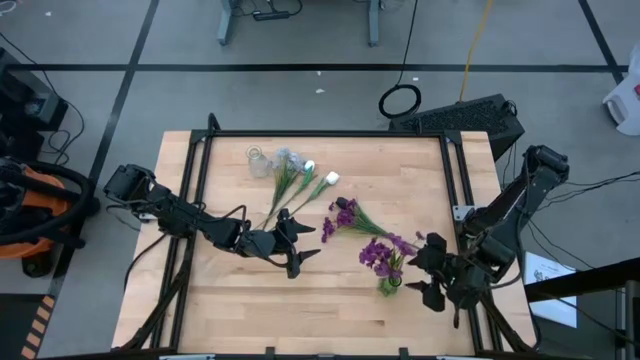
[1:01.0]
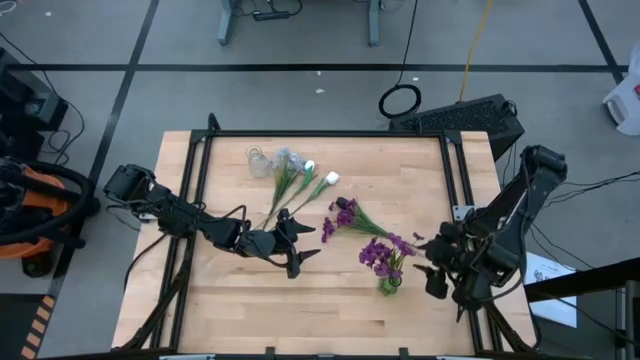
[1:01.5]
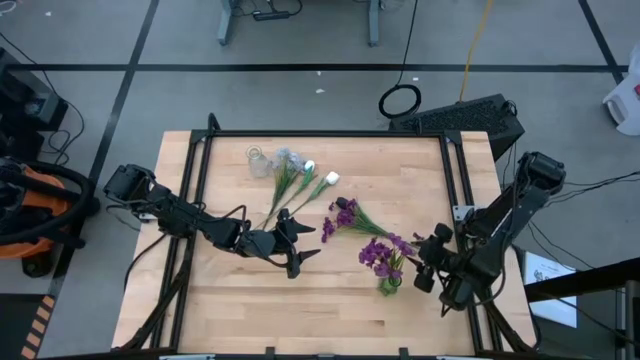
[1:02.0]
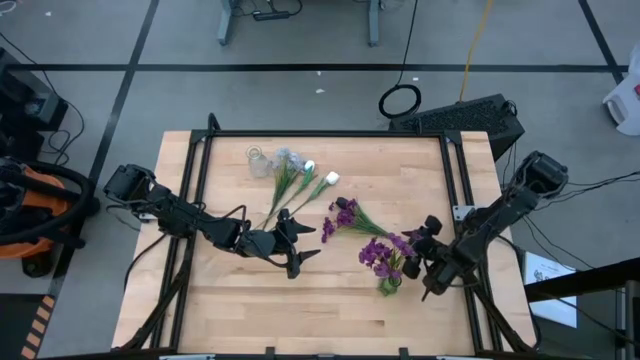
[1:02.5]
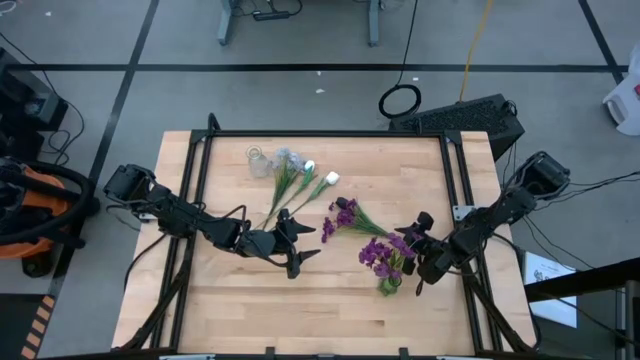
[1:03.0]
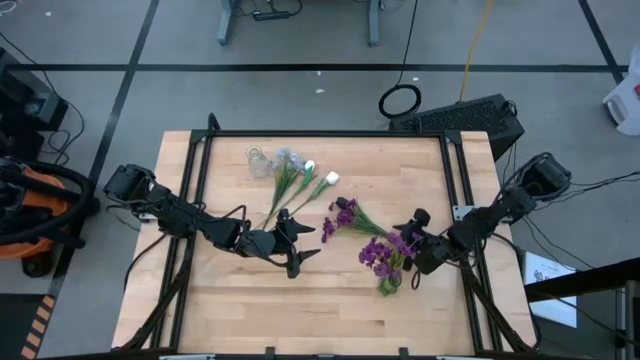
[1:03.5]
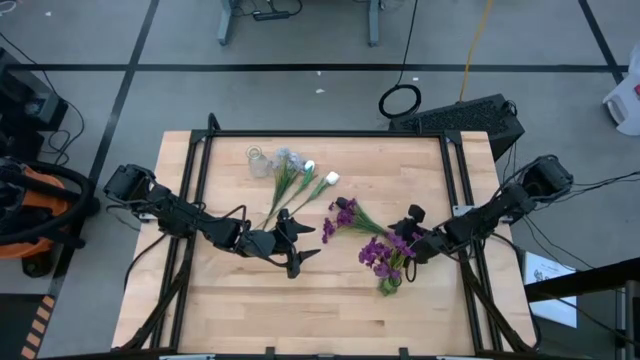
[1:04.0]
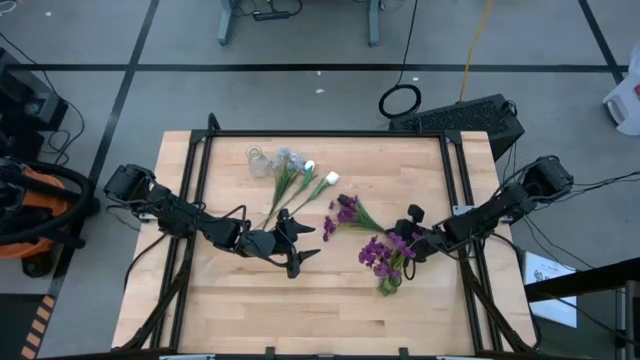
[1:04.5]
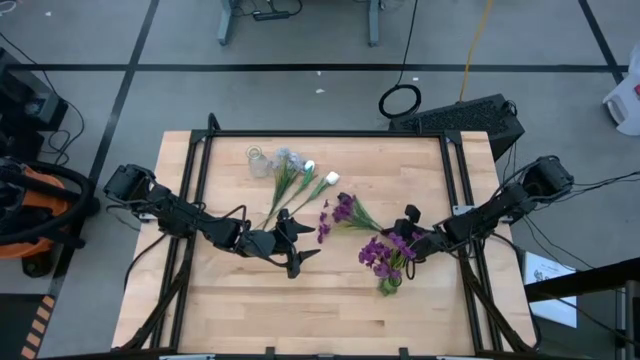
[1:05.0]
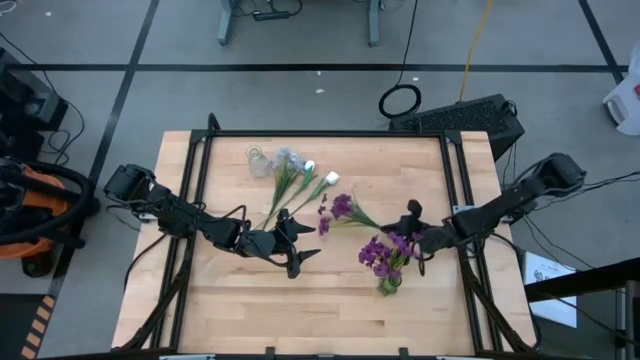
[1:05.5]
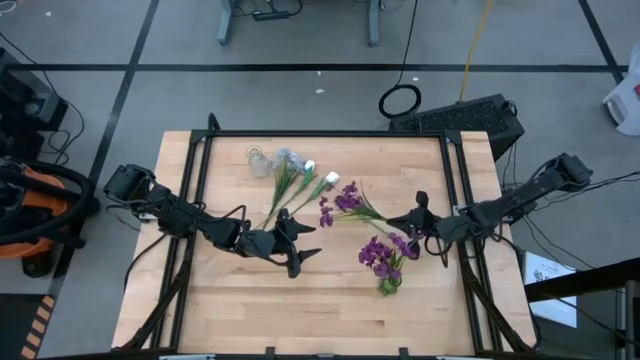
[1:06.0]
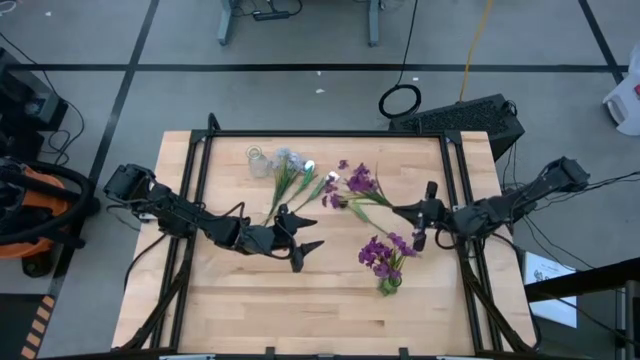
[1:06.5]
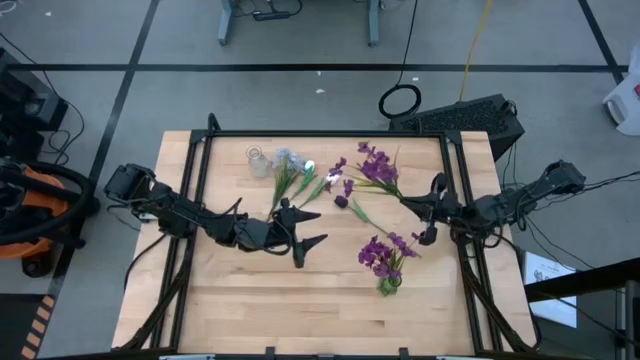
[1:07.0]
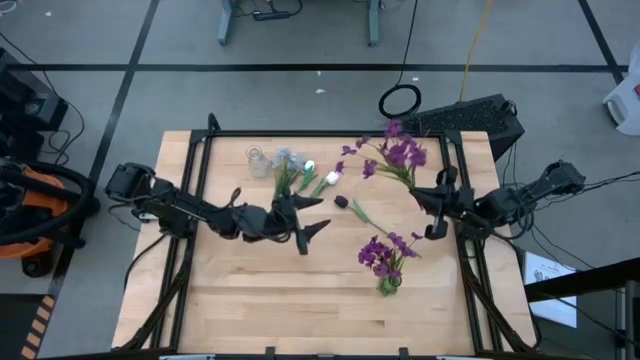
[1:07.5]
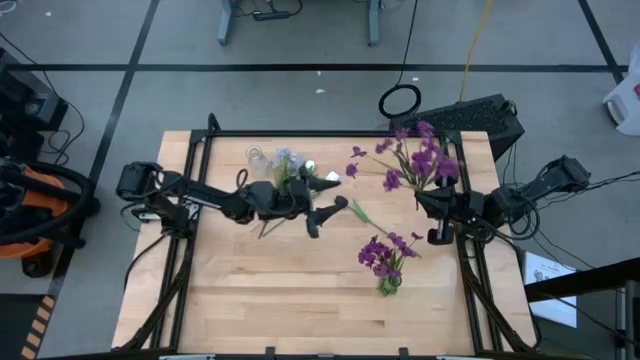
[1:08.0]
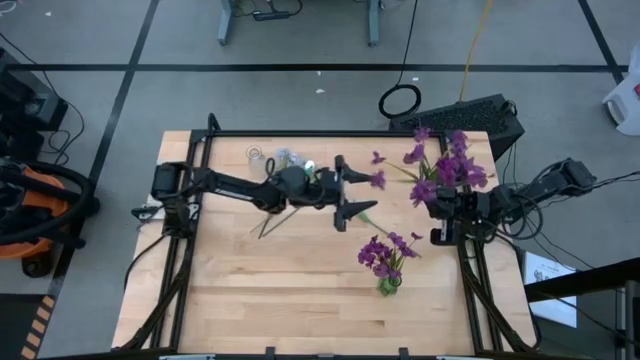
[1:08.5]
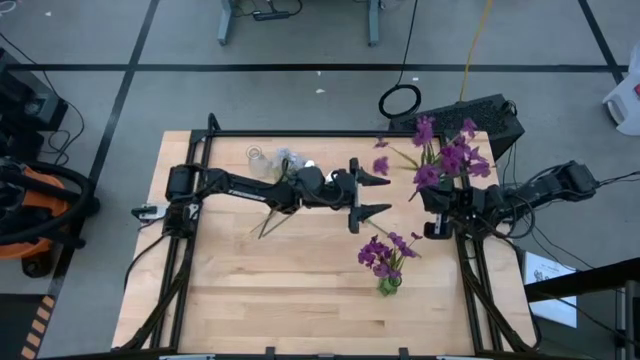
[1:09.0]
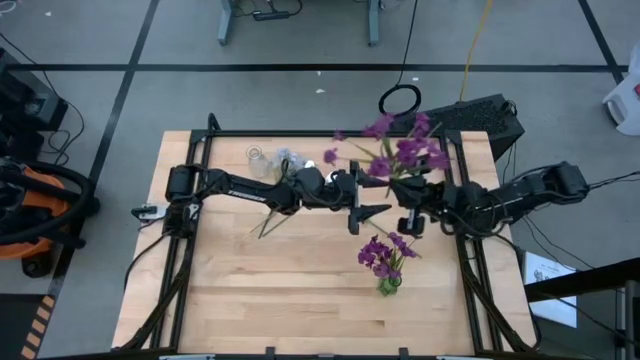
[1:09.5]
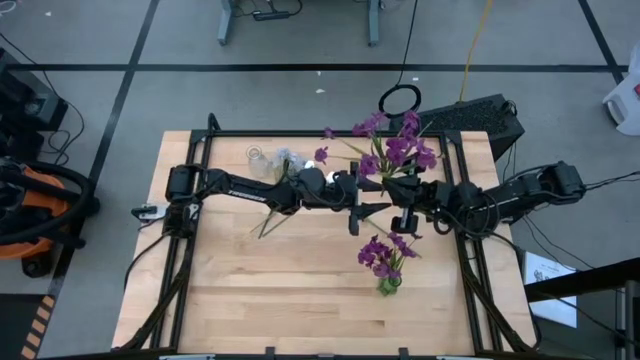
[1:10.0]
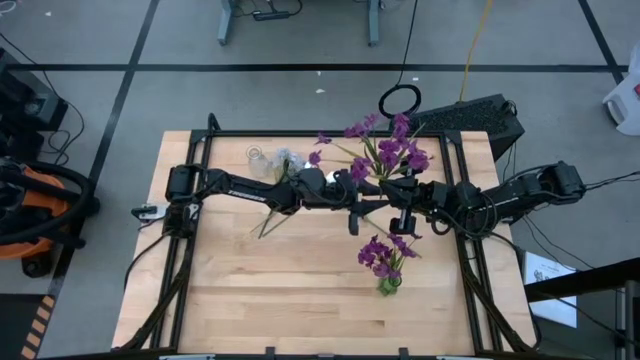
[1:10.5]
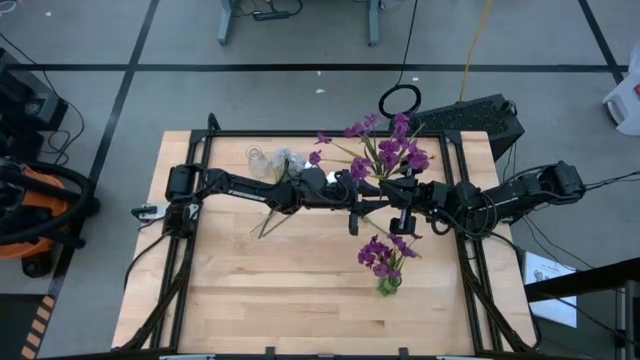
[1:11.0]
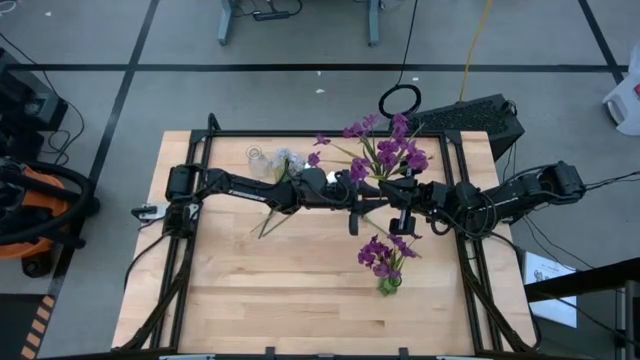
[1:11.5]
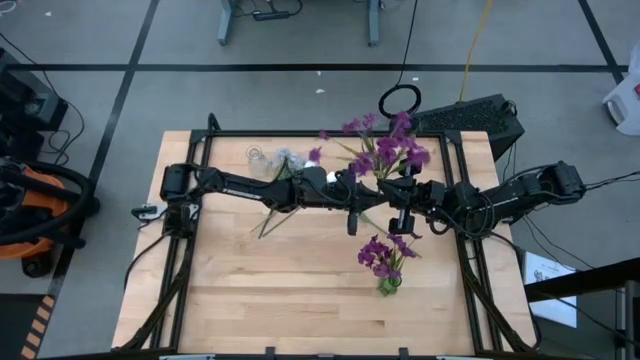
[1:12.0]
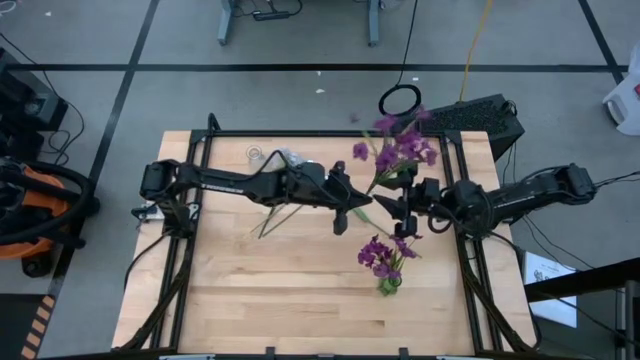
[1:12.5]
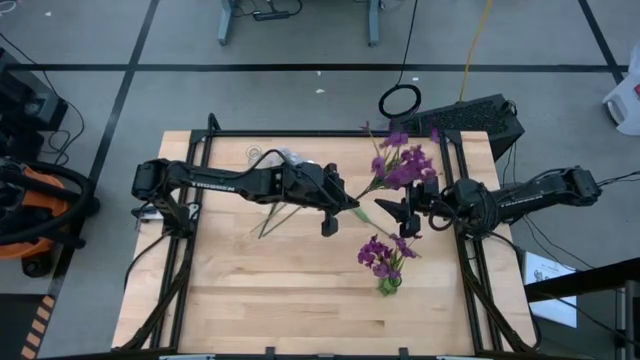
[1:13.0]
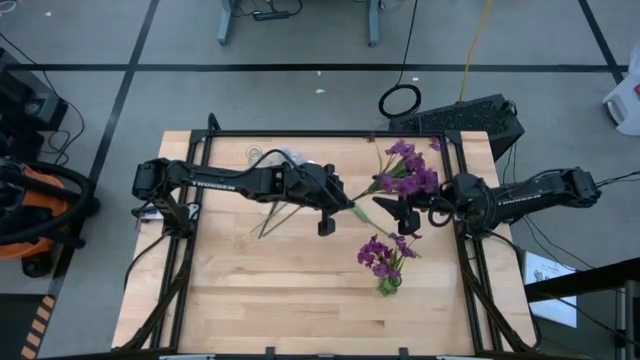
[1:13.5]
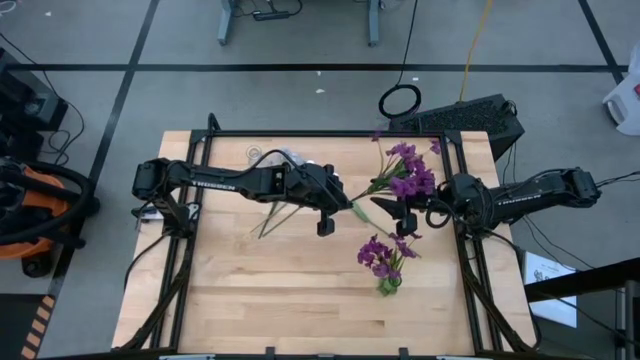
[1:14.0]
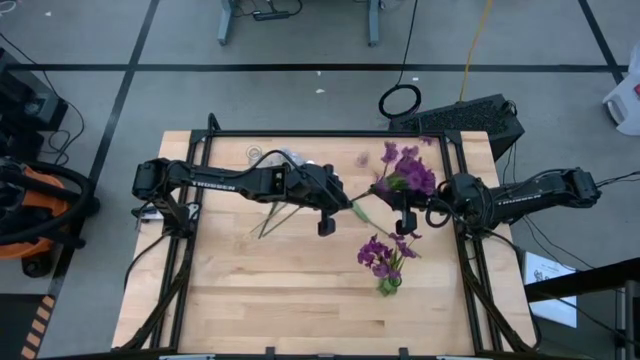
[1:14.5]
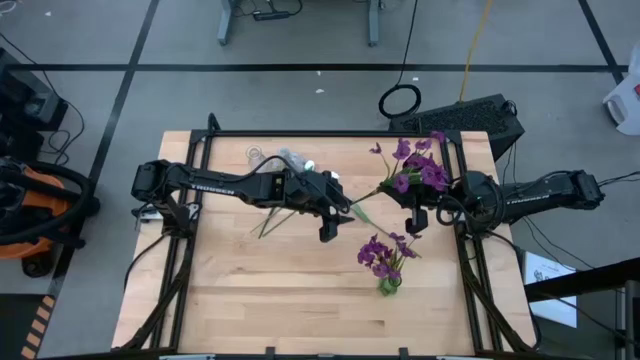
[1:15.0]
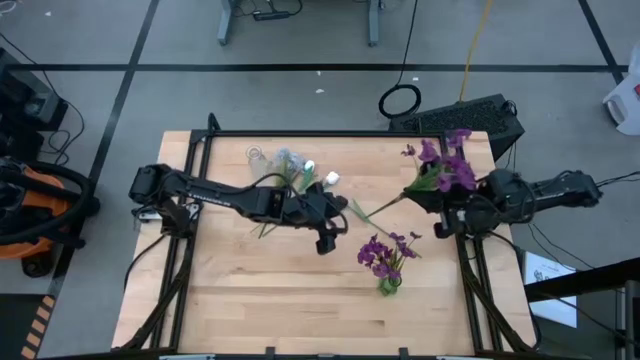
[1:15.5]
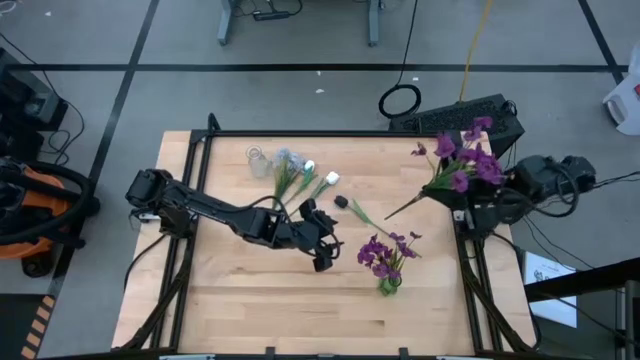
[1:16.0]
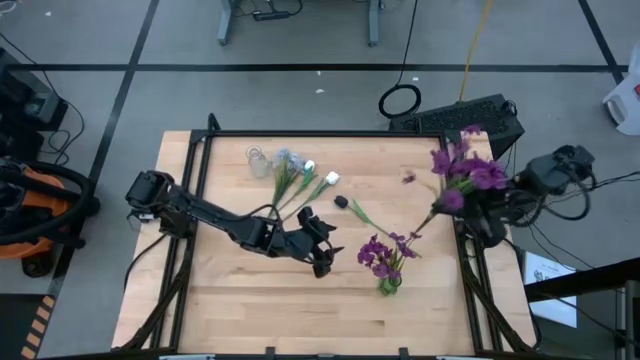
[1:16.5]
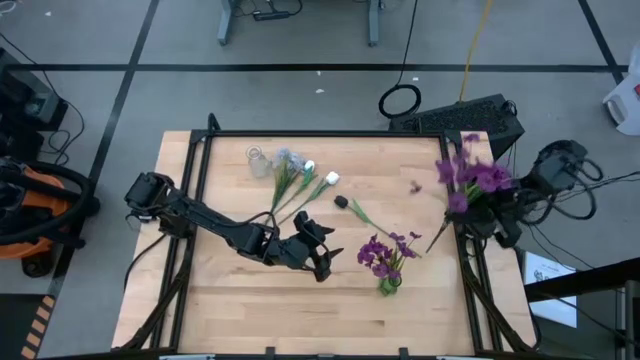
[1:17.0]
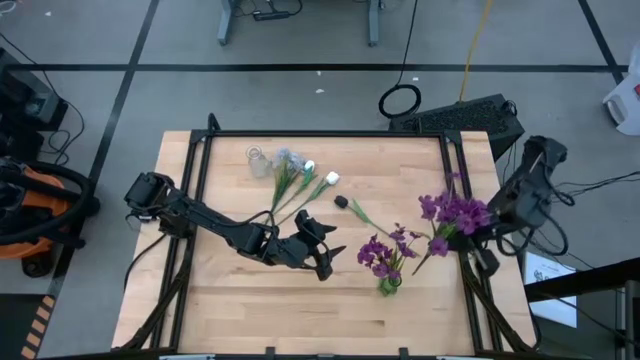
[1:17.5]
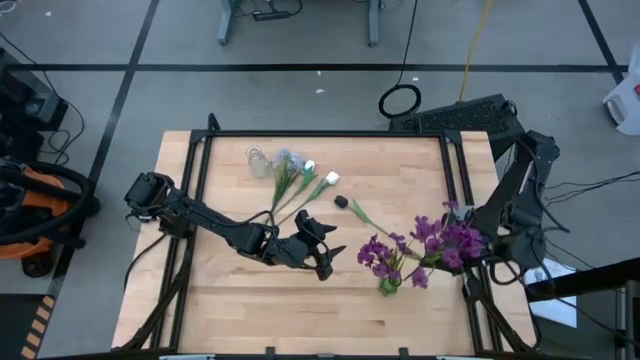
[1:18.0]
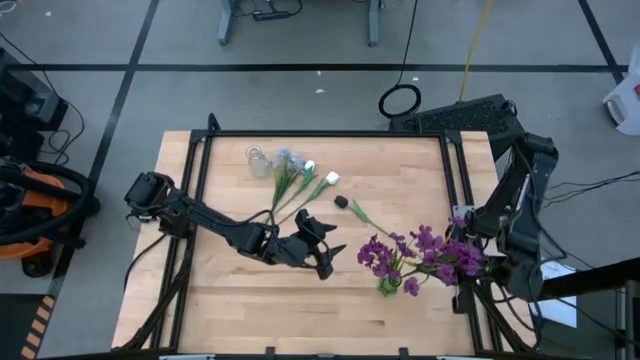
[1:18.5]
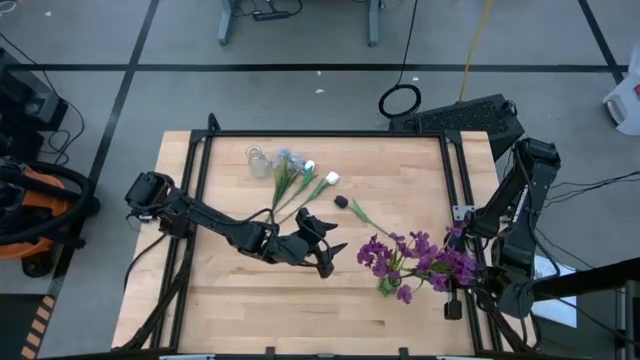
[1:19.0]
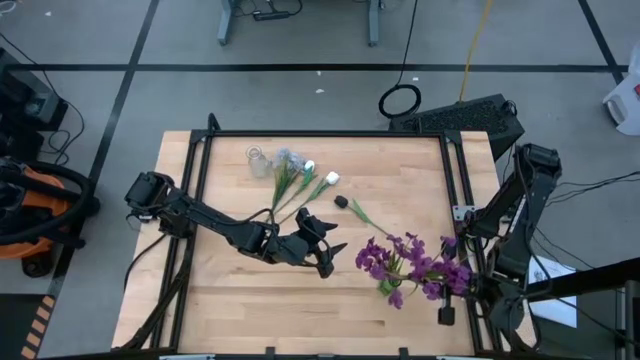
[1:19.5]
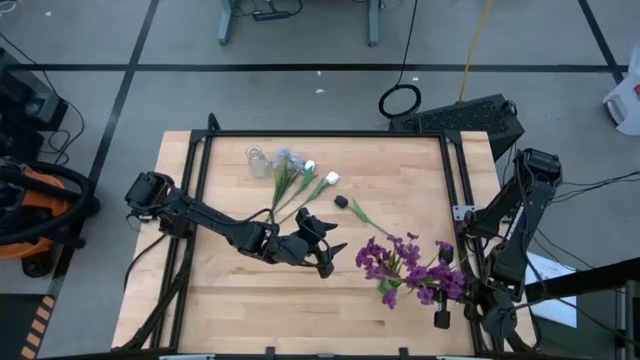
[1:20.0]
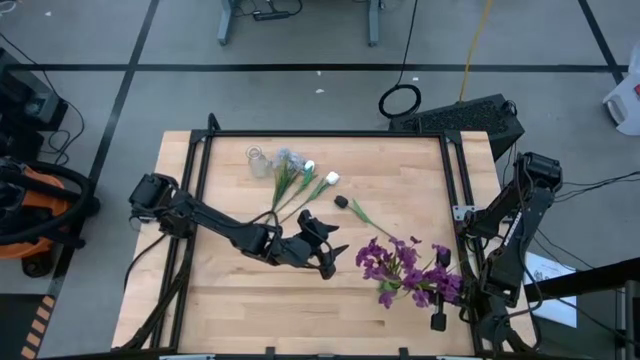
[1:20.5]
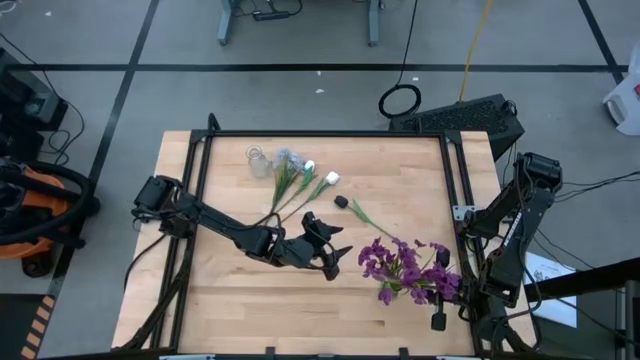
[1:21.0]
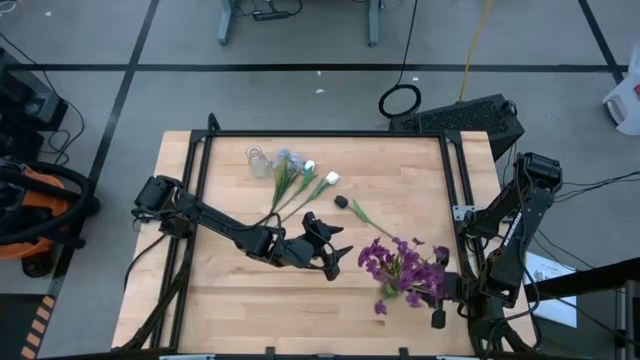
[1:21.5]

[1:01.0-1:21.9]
Task: Sort flowers into vase by color
Put the purple flower into the green vase
